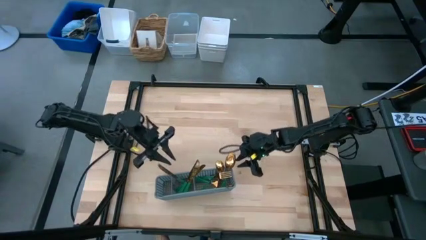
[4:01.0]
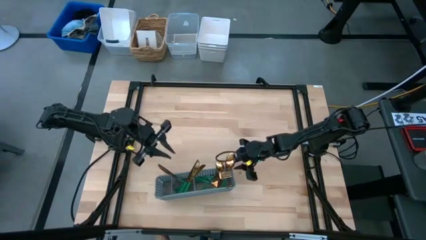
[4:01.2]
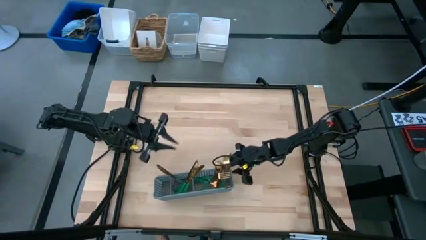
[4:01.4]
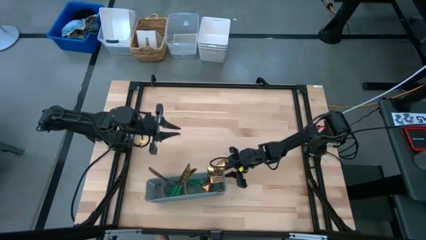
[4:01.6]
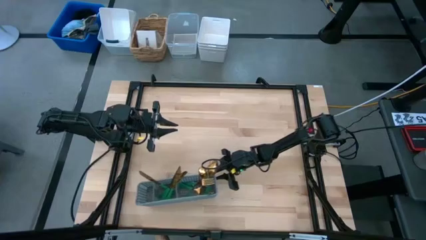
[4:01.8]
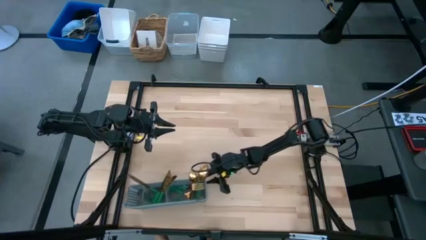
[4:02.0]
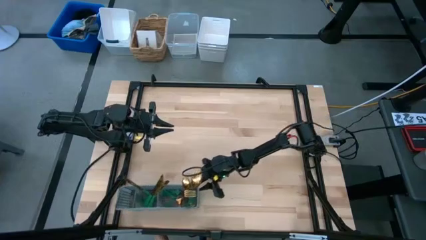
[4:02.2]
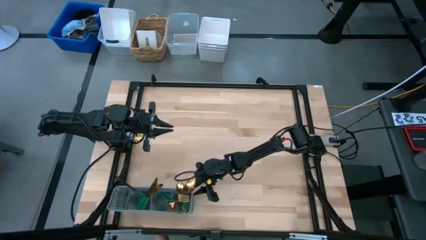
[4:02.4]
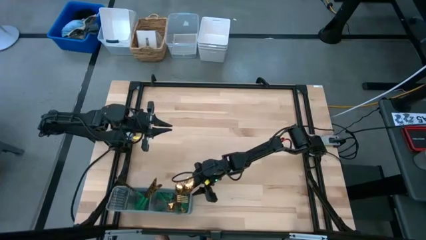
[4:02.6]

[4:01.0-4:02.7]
Task: Sort silverware
Move the cutlery rack to the bottom left of the table

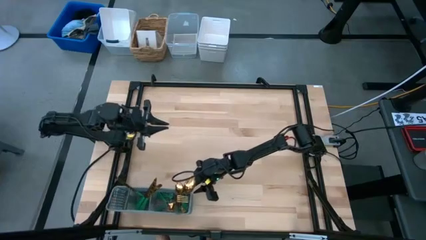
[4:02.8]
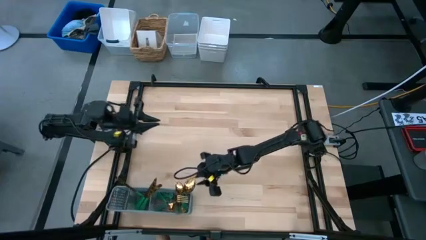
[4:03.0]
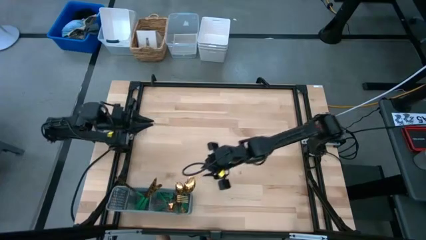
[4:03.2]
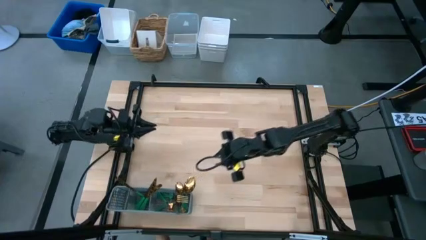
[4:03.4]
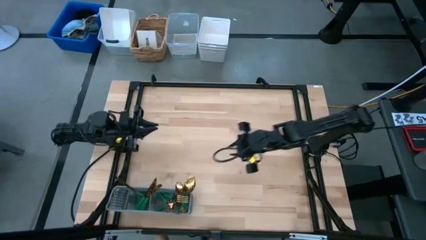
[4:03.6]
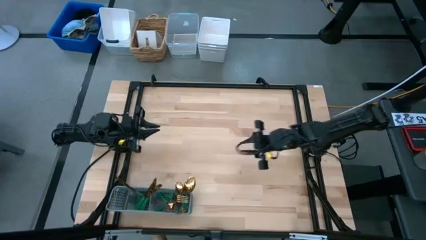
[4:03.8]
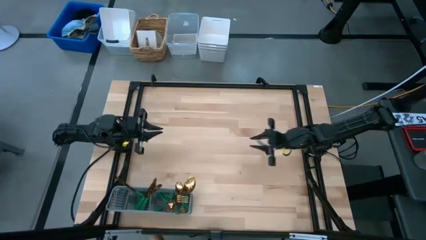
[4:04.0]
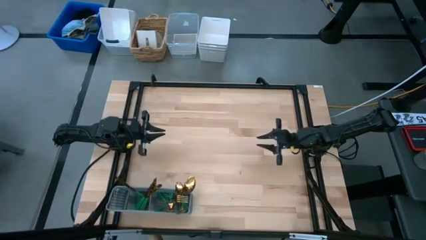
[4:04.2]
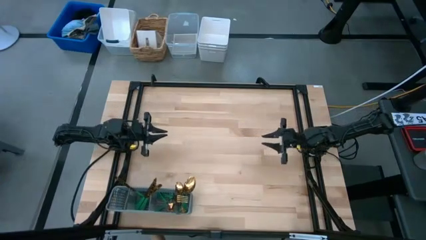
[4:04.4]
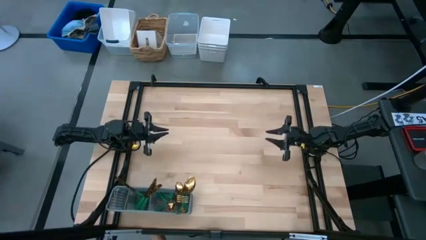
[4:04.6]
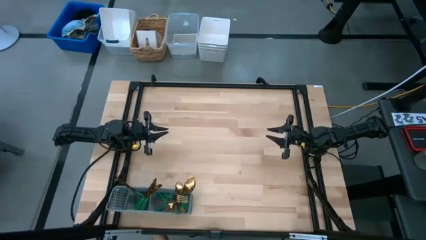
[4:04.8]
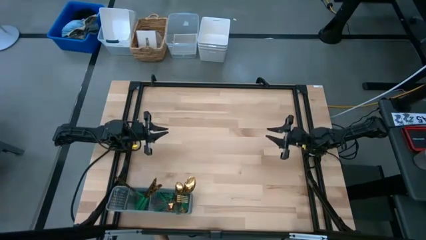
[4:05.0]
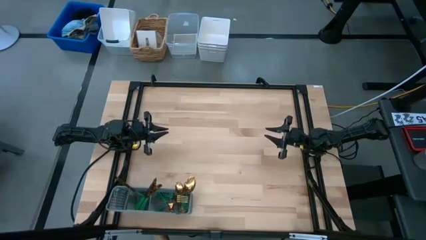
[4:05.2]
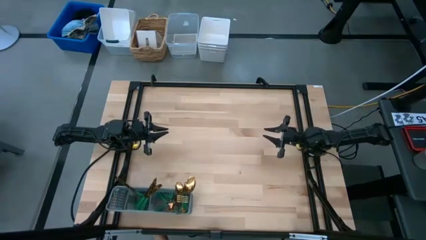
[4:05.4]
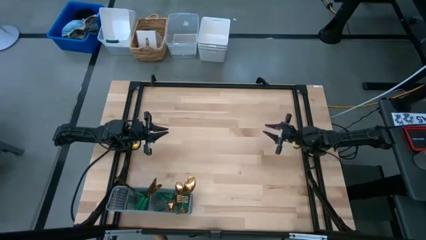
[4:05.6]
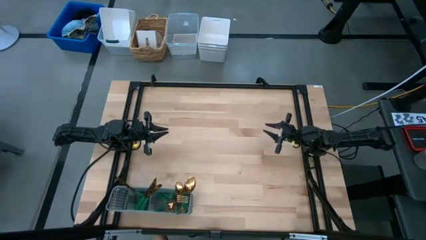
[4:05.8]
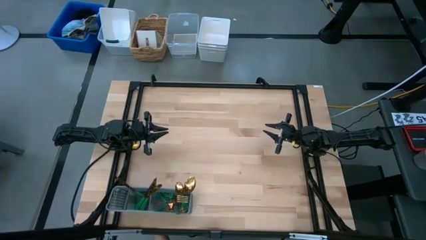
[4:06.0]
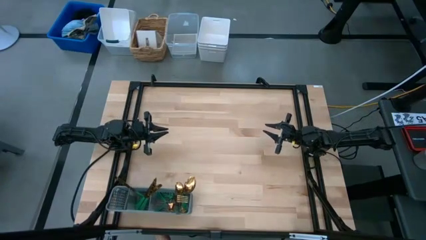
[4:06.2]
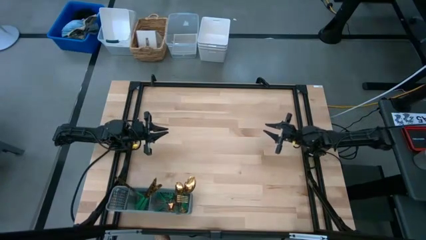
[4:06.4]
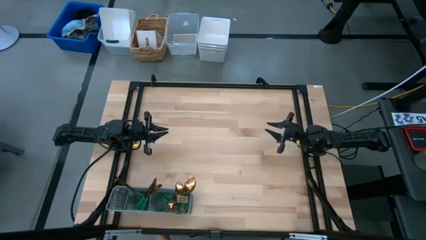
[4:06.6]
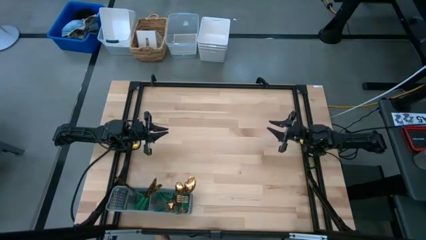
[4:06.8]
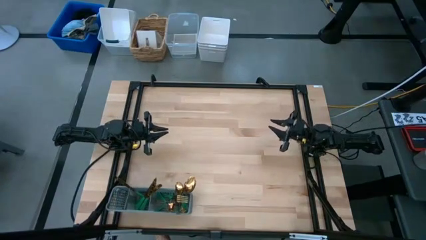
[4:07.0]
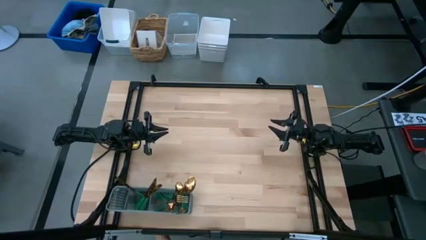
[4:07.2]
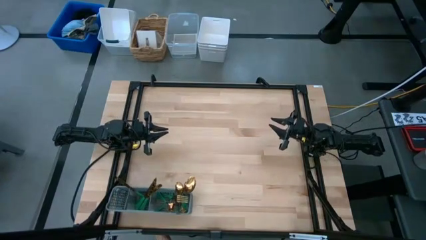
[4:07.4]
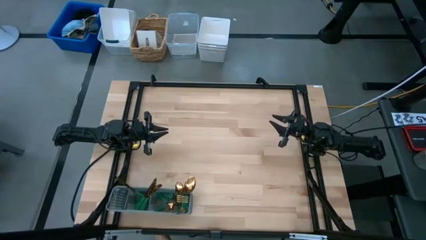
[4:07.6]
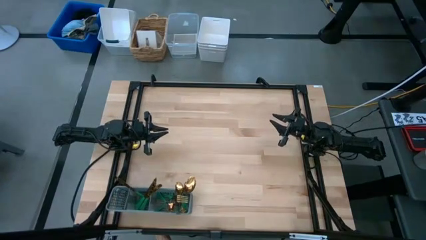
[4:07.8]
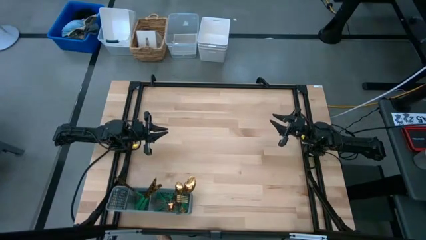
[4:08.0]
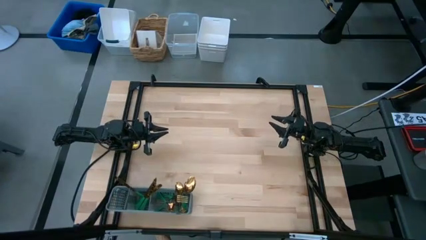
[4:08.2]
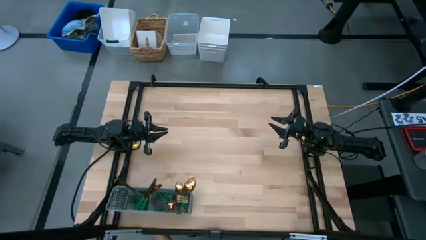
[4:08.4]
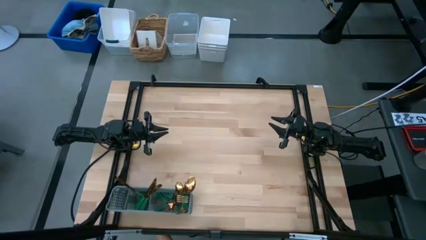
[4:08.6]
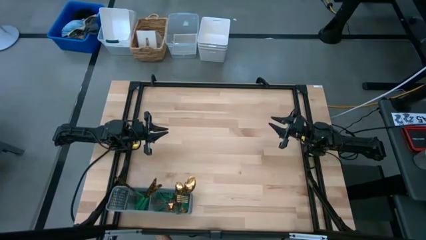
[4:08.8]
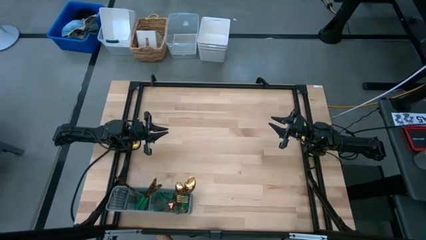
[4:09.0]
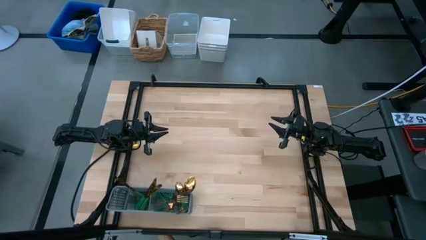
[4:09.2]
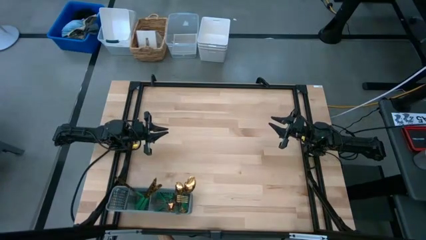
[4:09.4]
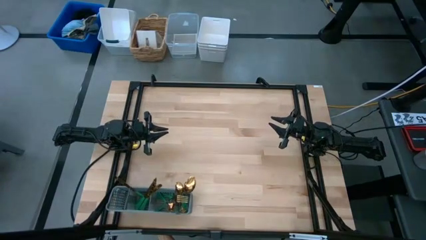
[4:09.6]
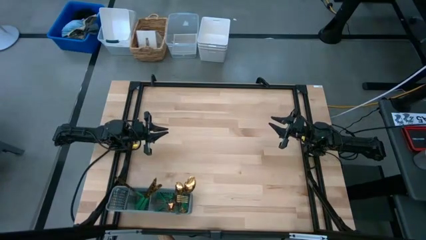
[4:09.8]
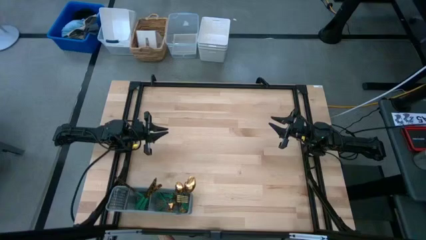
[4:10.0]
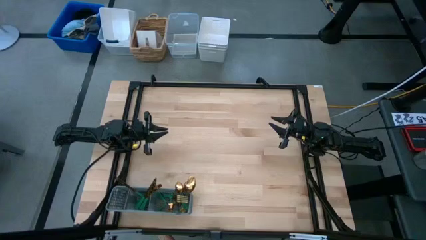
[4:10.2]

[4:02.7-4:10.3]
Return to Home Position
